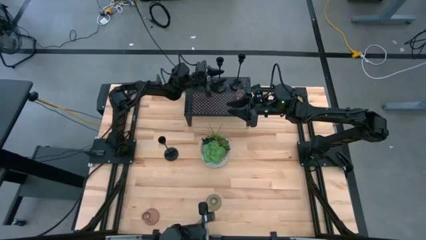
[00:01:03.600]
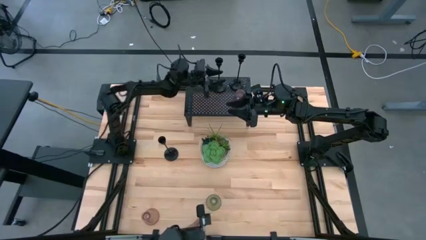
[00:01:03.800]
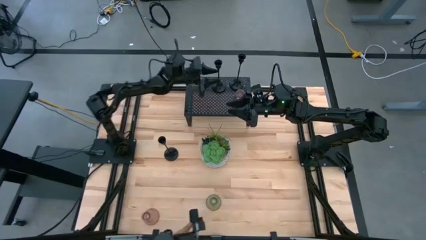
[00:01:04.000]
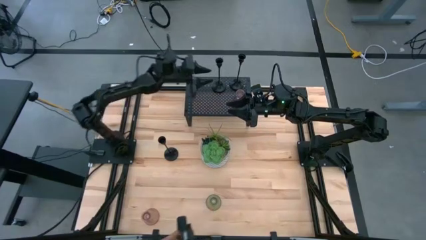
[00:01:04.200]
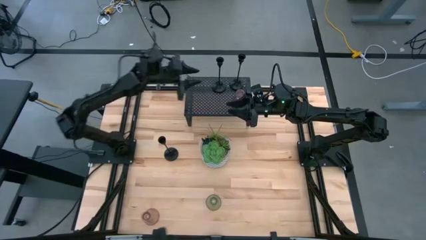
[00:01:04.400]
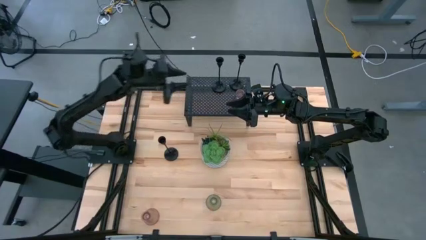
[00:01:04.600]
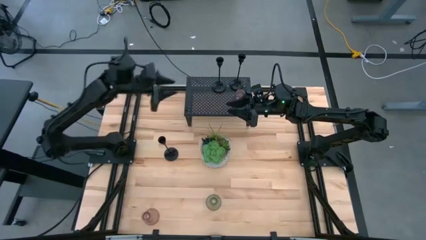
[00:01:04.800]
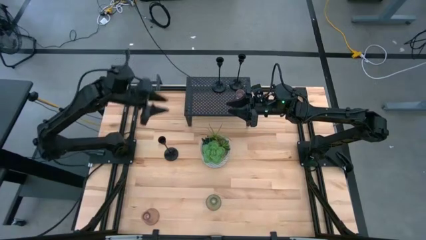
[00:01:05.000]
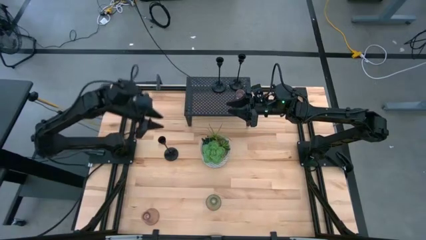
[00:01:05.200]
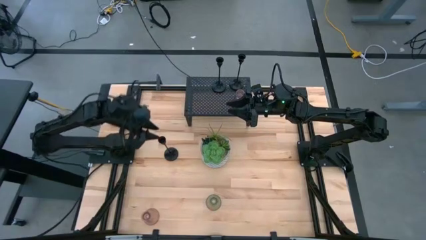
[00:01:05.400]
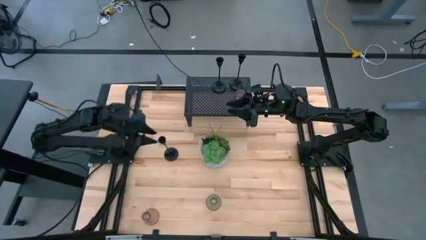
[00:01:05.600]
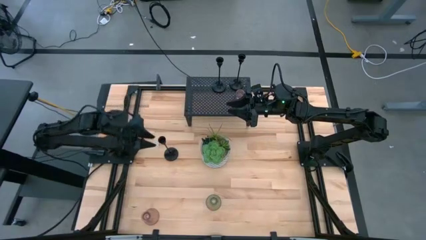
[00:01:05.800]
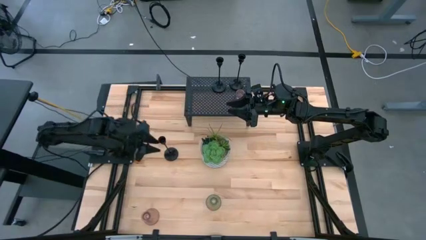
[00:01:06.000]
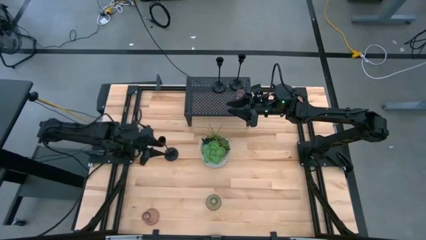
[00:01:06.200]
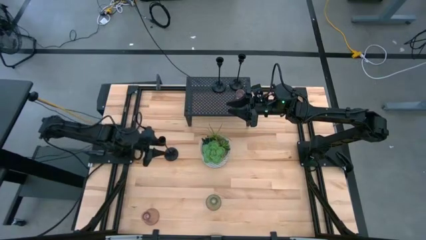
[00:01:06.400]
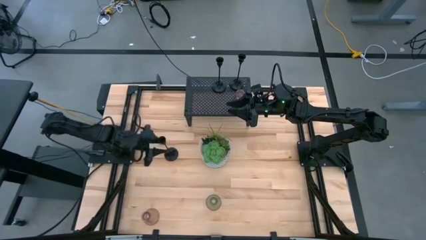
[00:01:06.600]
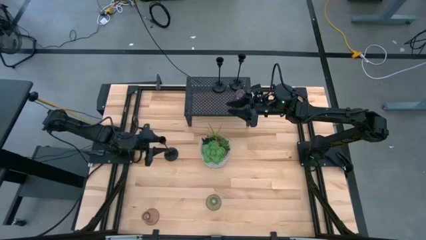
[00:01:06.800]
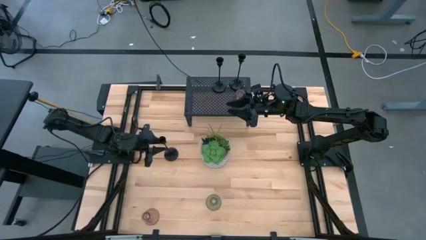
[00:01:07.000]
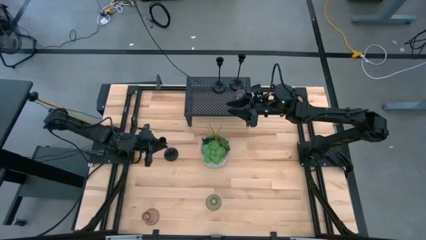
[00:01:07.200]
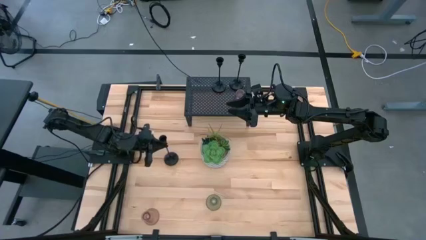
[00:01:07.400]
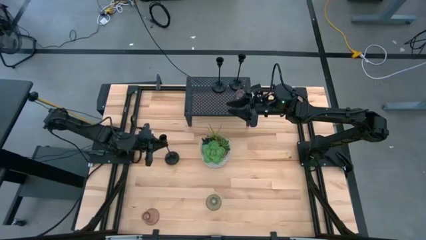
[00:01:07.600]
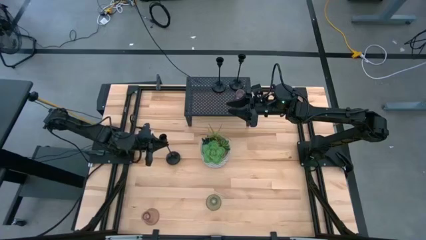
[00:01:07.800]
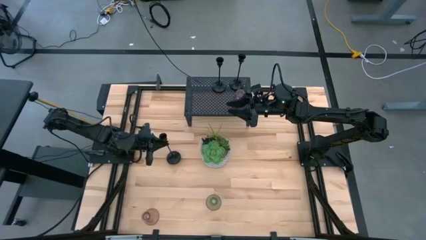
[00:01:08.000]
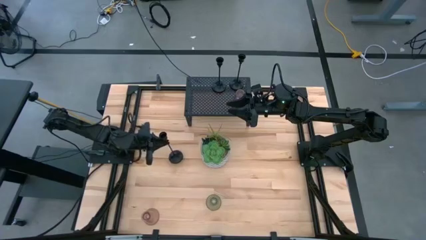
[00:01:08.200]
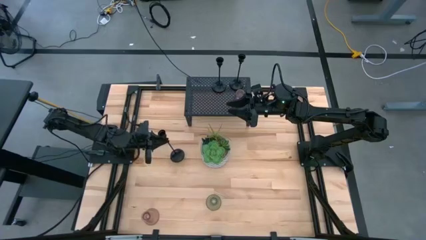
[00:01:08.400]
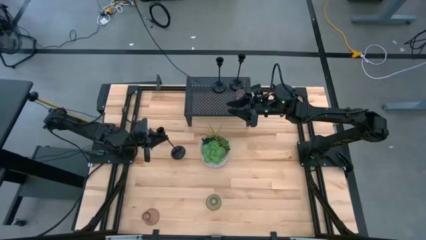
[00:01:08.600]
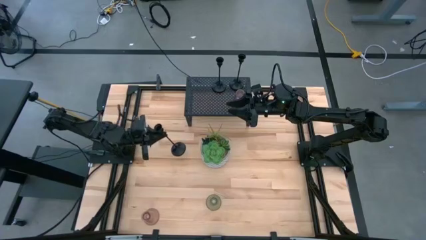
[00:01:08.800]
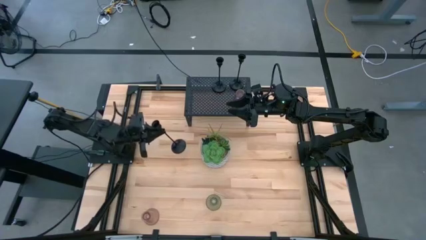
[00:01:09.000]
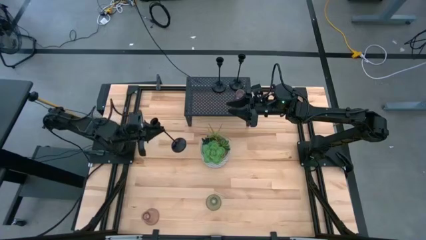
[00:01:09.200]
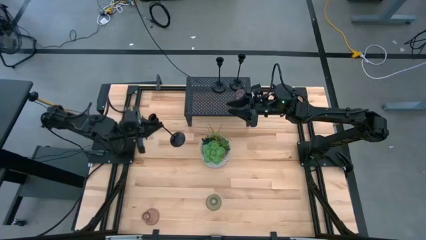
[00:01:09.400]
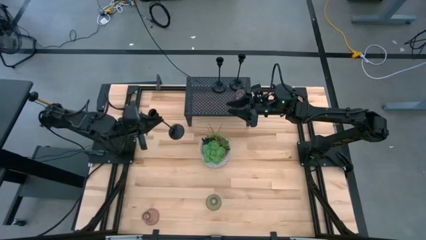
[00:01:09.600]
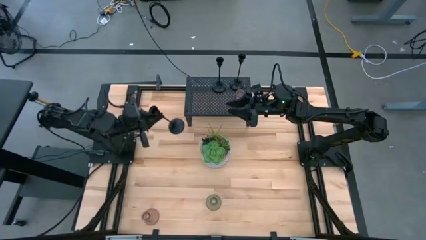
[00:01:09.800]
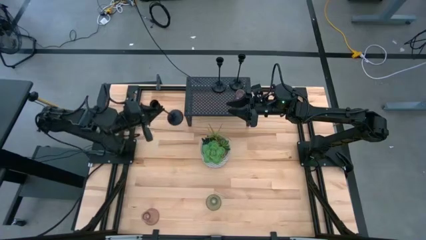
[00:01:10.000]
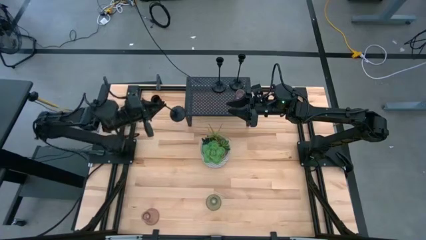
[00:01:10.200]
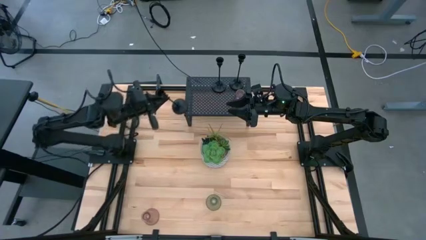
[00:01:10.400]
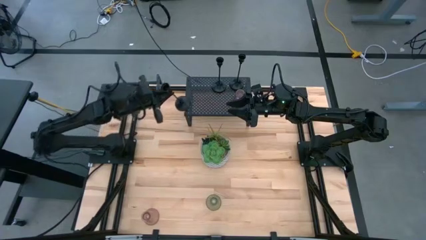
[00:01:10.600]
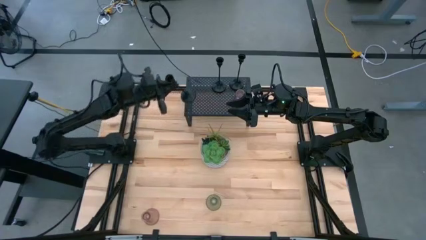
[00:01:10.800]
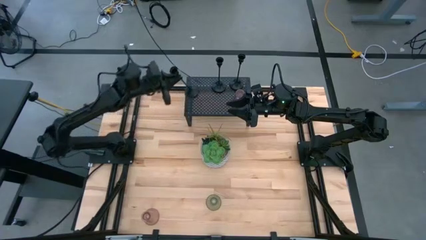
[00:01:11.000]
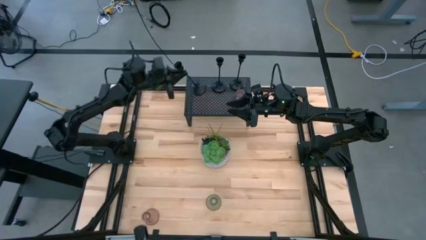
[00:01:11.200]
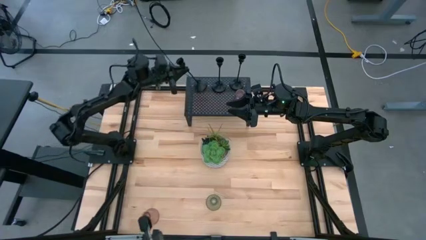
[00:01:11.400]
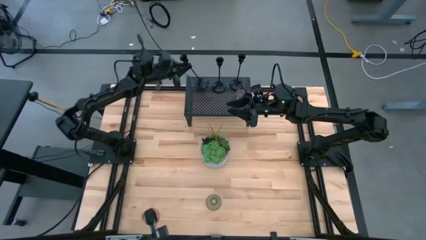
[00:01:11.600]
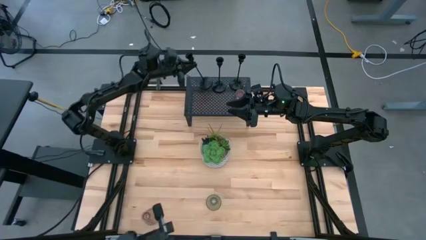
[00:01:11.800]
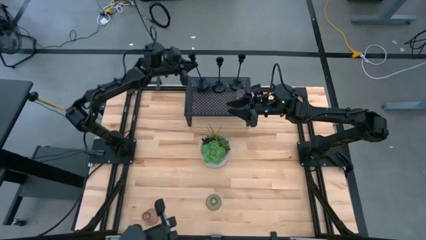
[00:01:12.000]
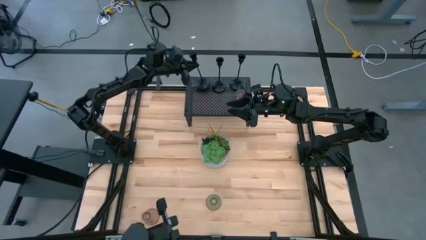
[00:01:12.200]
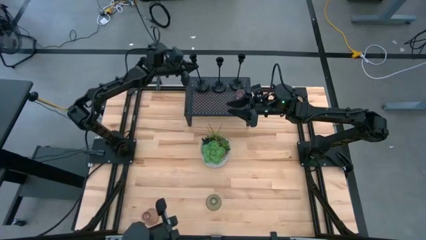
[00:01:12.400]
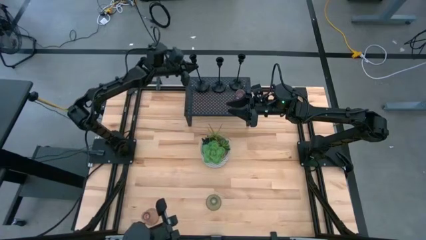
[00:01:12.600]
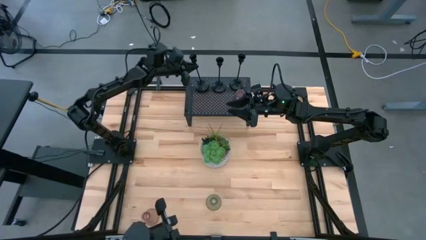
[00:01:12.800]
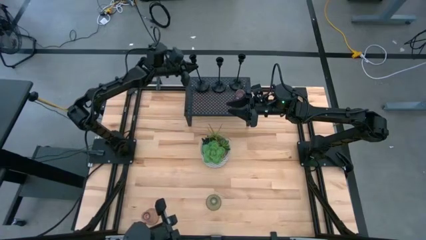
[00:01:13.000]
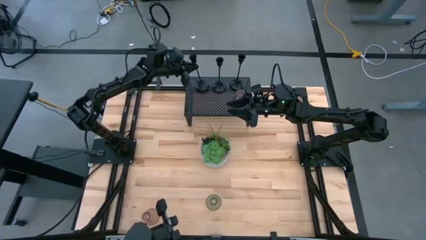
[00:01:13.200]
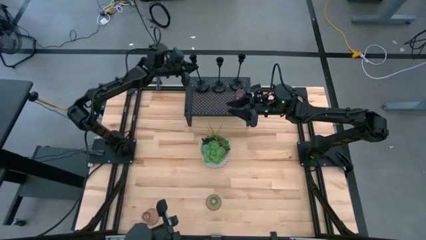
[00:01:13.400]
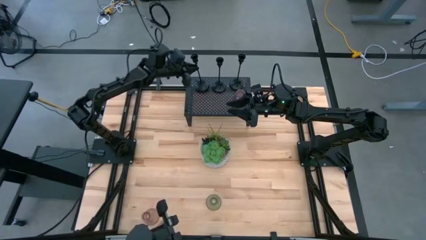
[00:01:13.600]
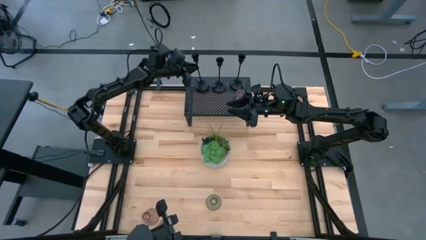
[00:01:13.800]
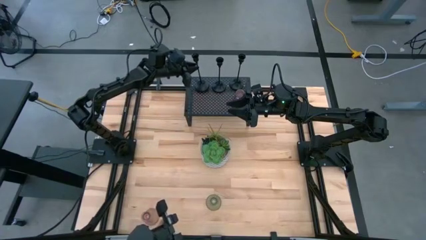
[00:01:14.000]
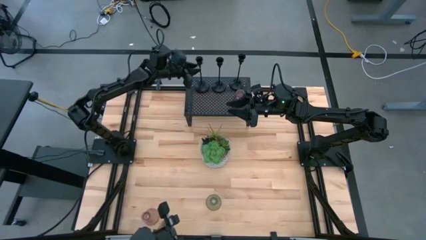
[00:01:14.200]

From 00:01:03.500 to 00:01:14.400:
Task: Pick & Place candle stick holders
Put the black candle holder on the shelf
